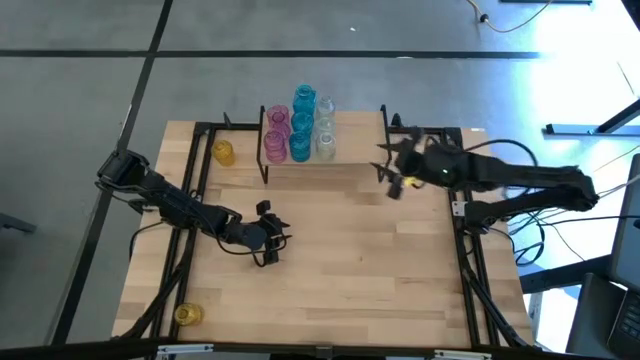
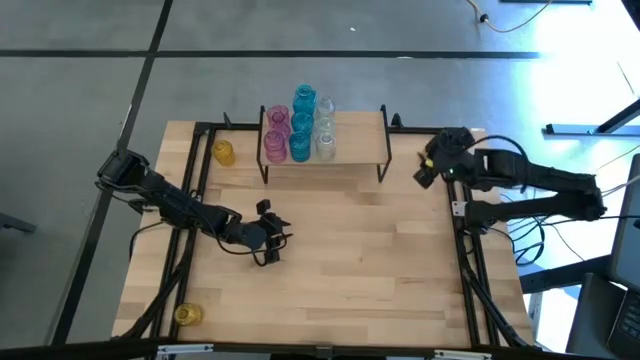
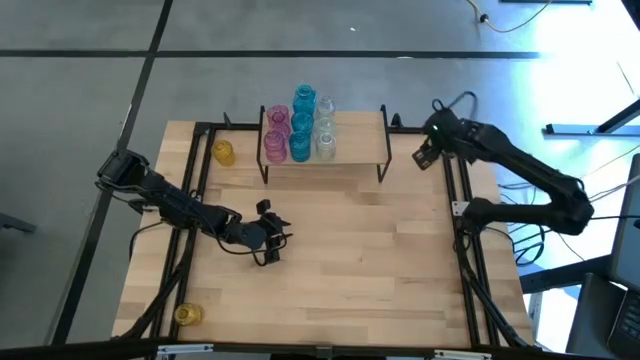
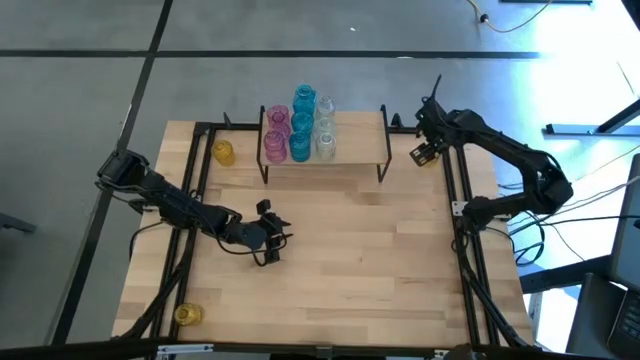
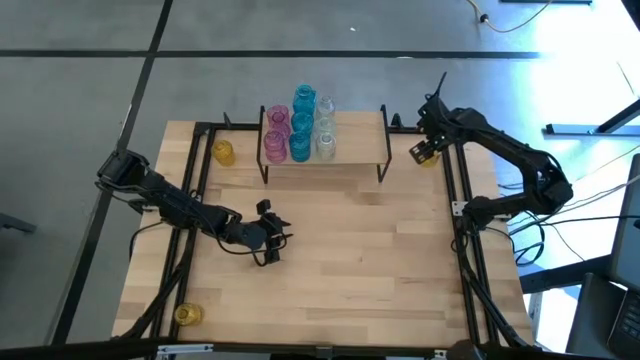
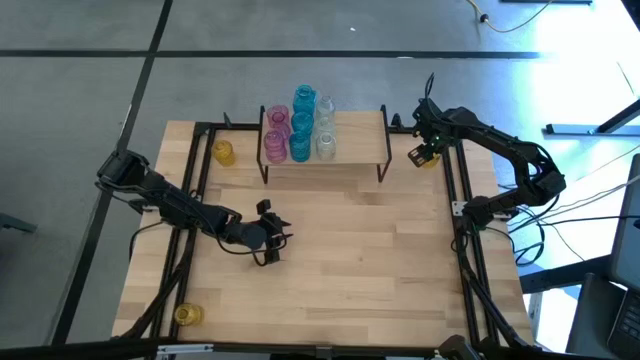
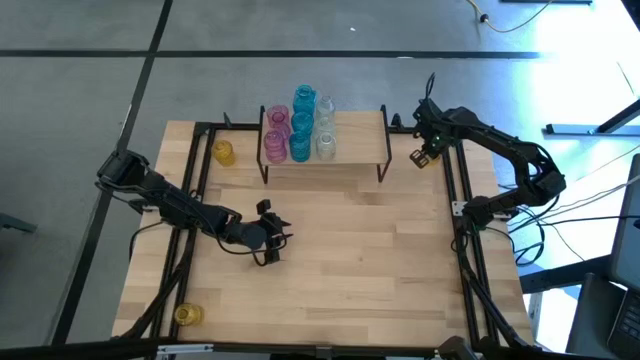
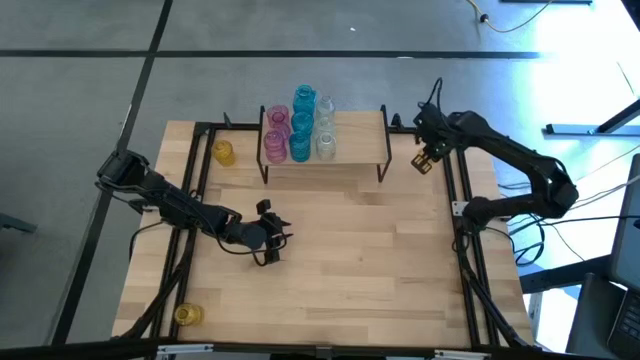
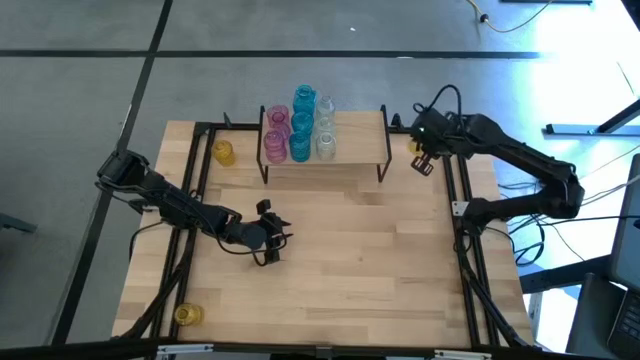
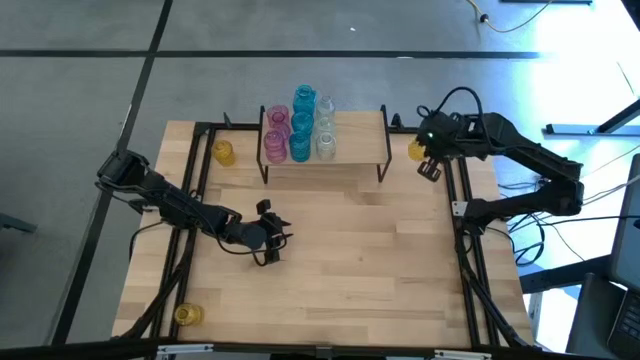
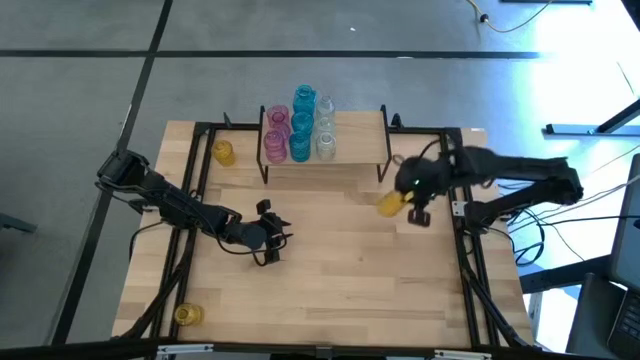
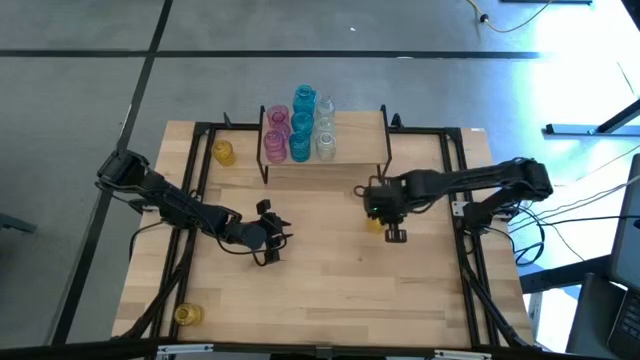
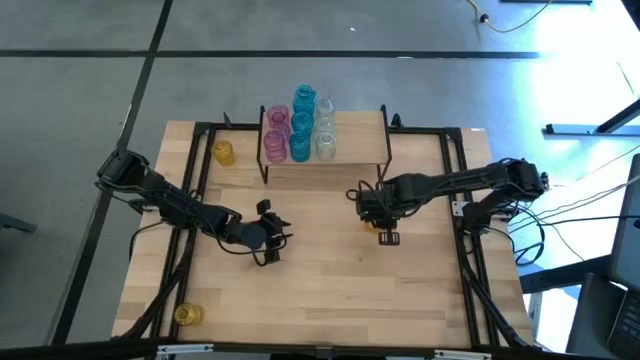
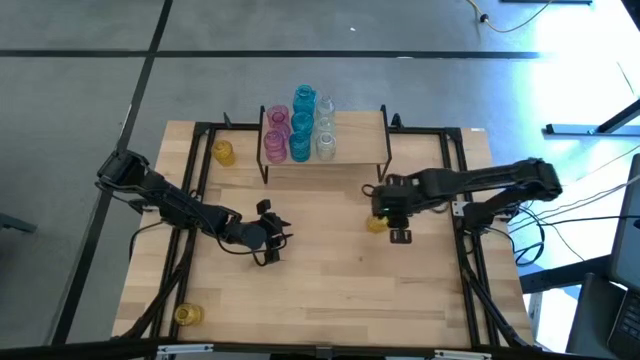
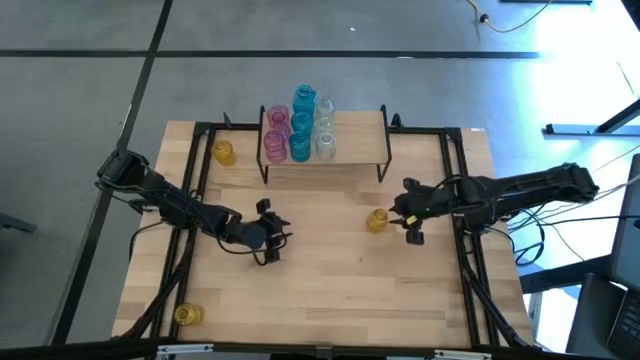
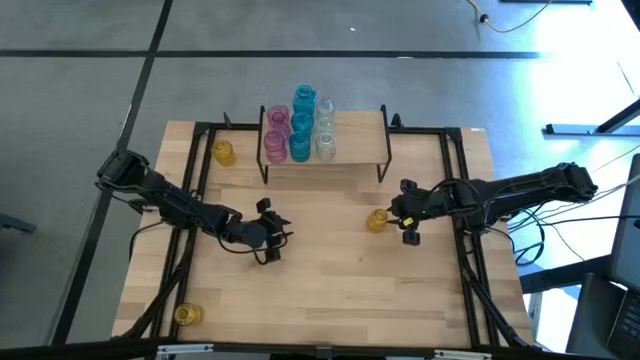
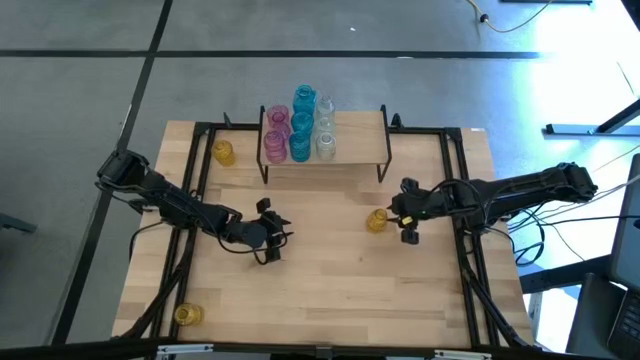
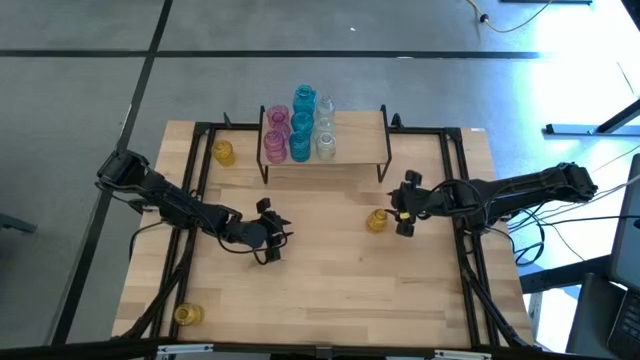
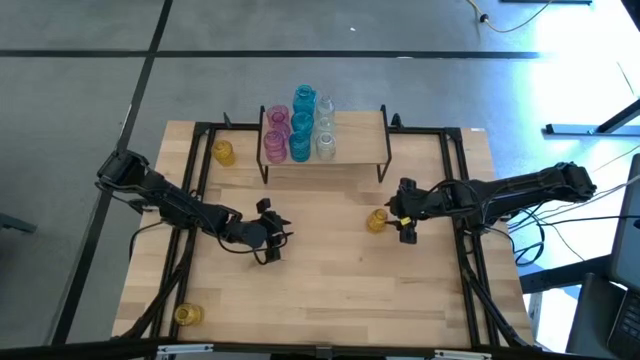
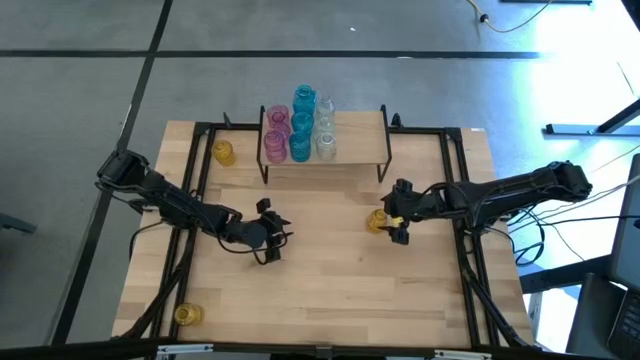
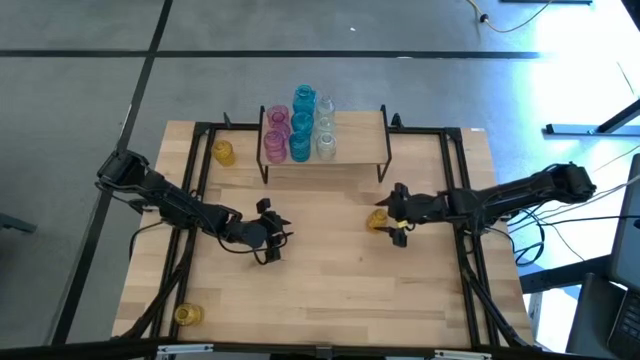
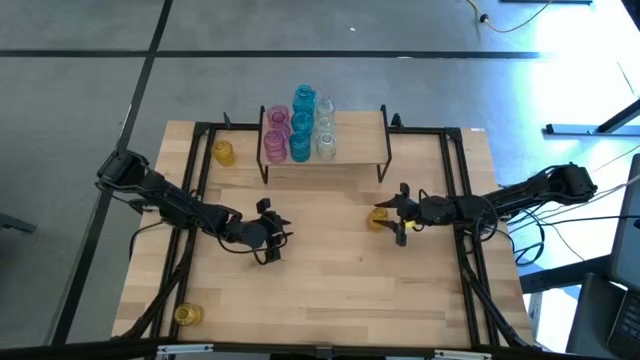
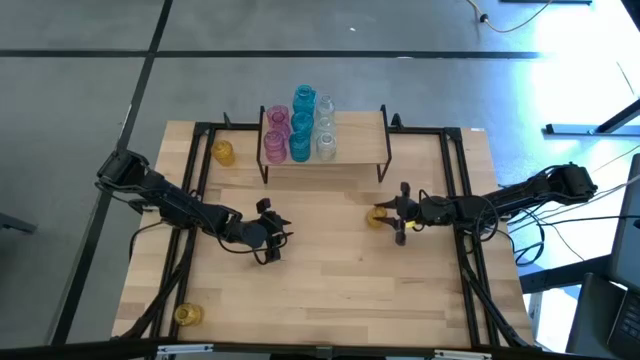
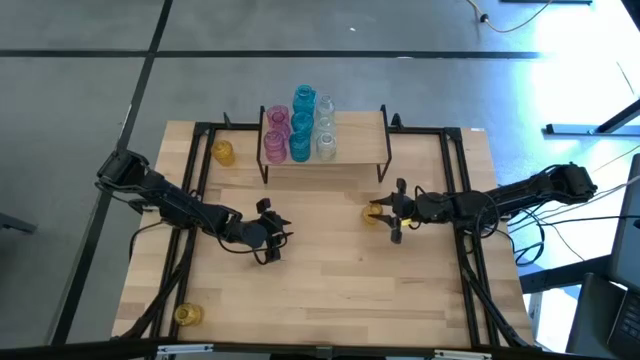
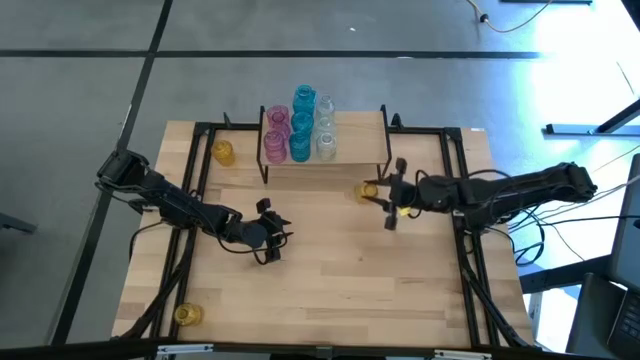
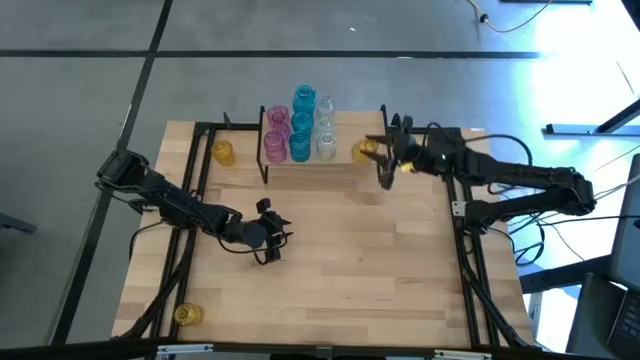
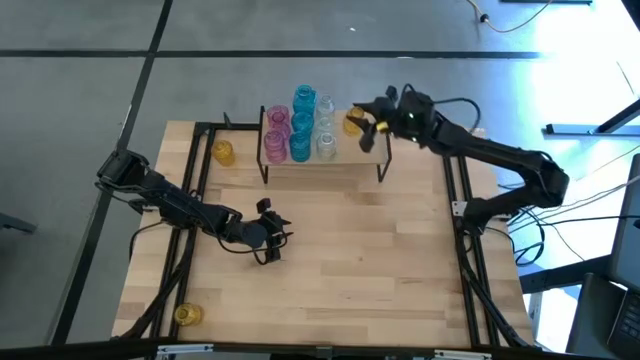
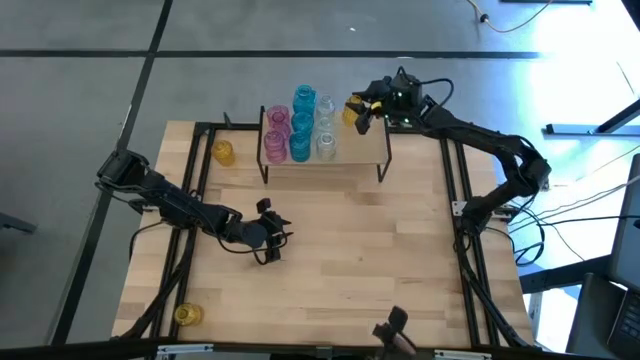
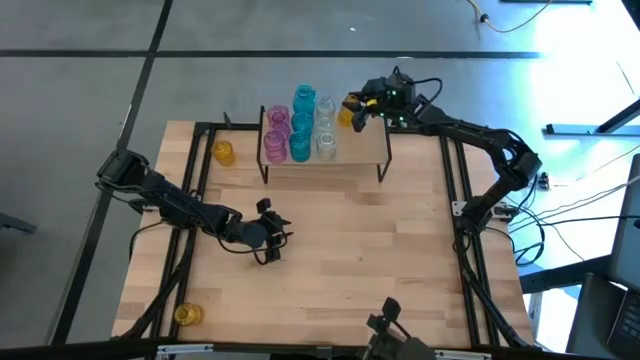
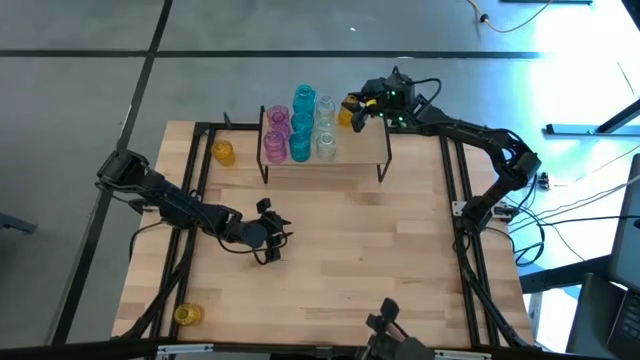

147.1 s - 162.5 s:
Task: sort vases onto shelf
Put the top right yellow flower vase on the shelf

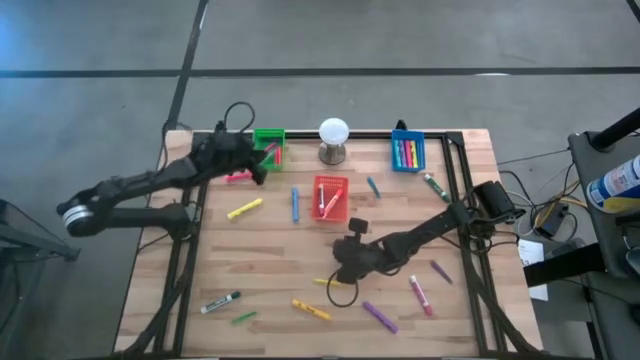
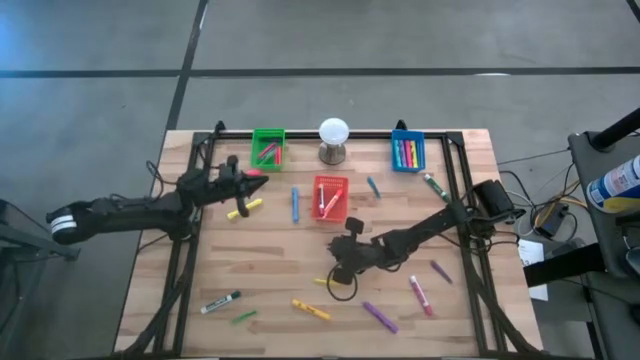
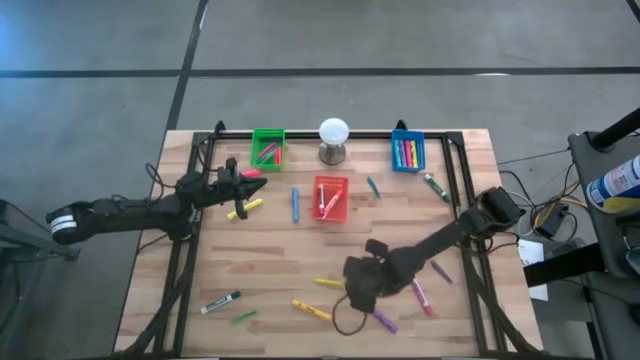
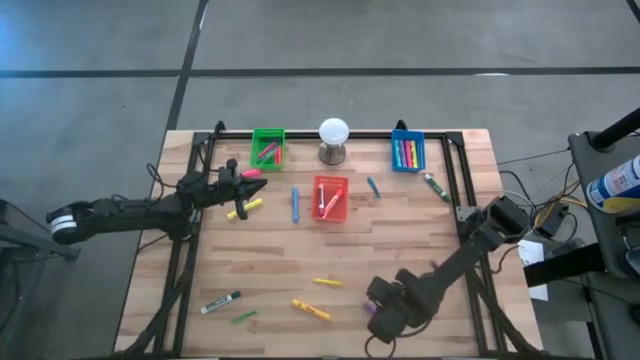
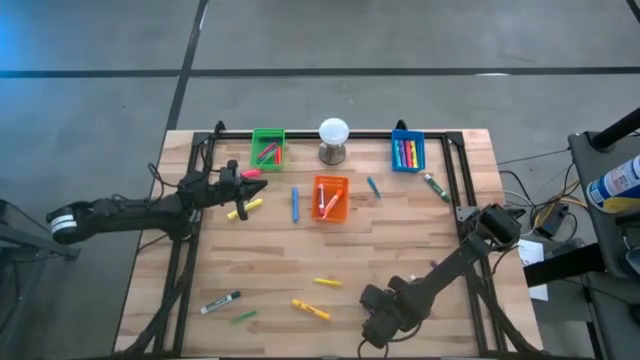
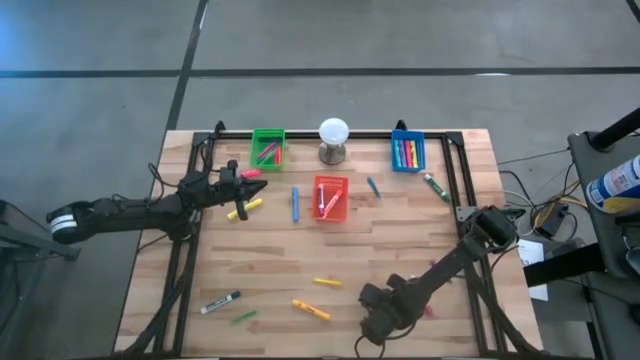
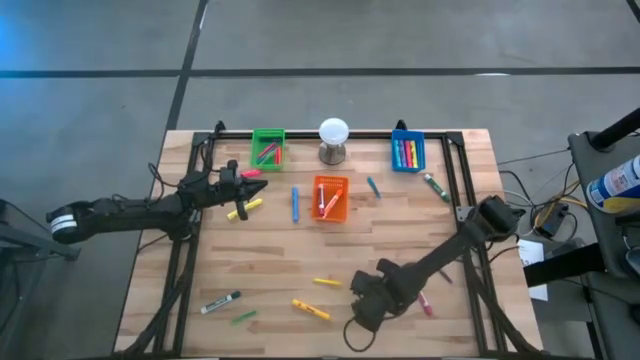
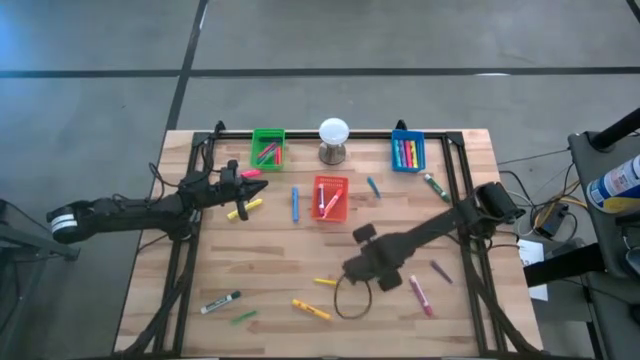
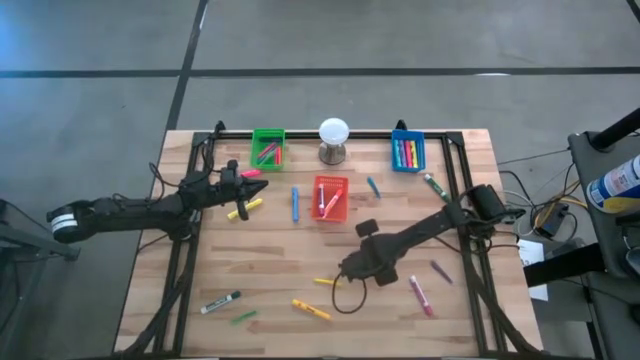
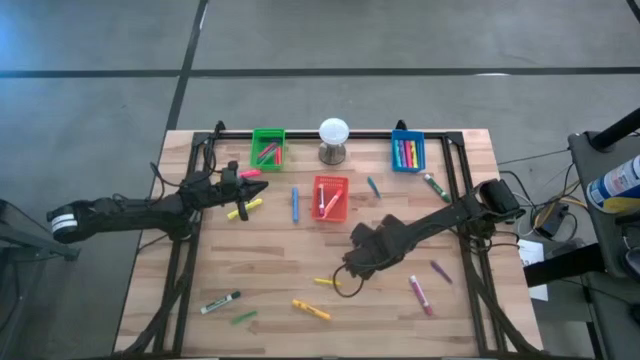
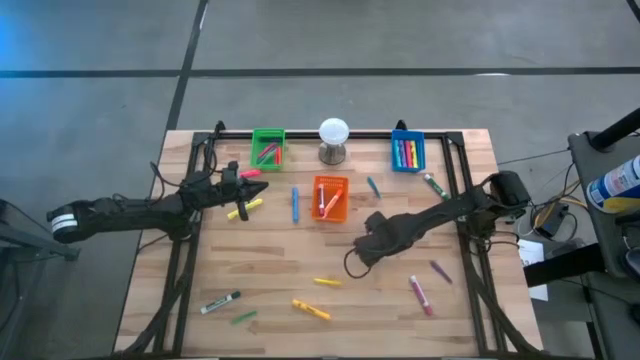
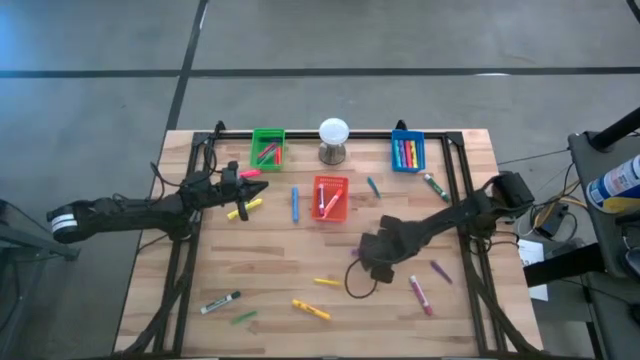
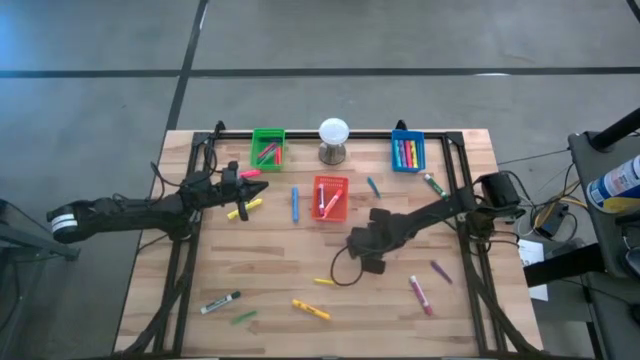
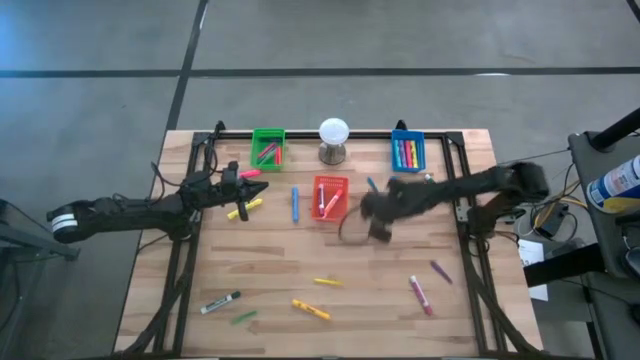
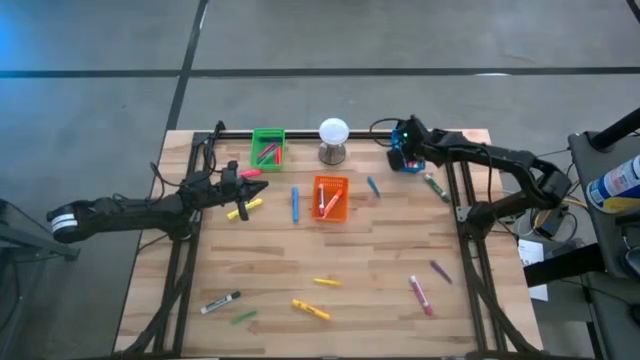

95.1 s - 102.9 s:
Task: Pick & Place Markers
Put the purple highlighter into the blue bin
